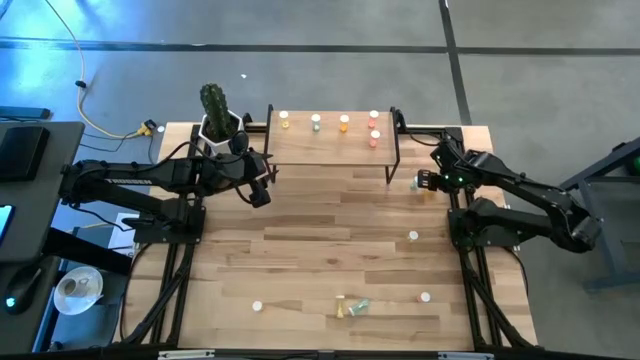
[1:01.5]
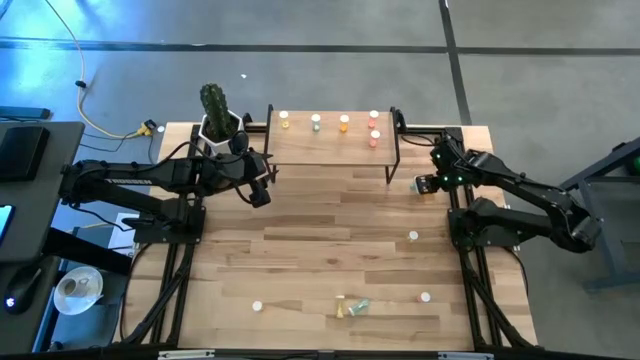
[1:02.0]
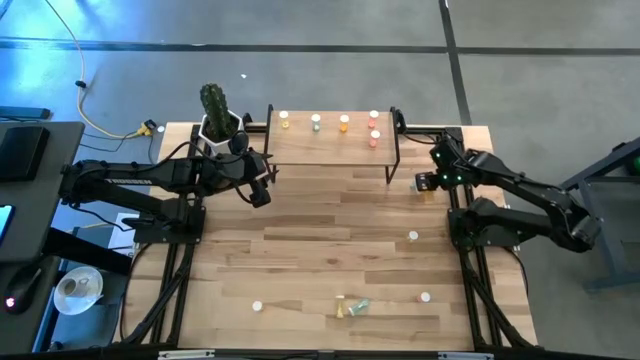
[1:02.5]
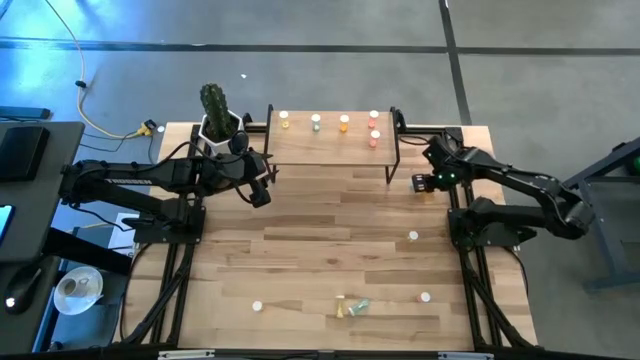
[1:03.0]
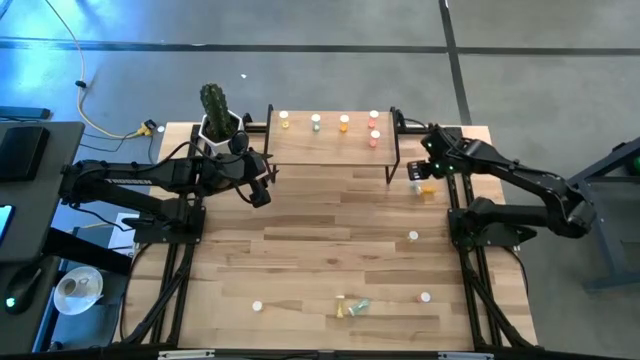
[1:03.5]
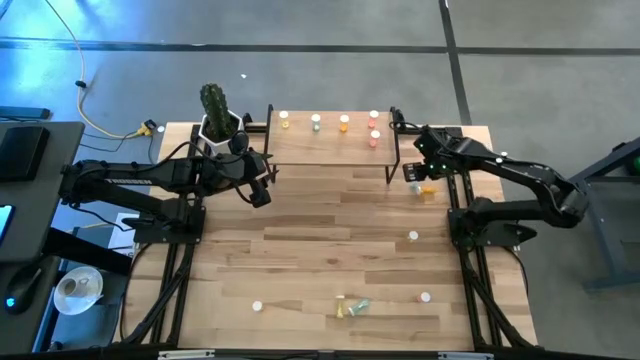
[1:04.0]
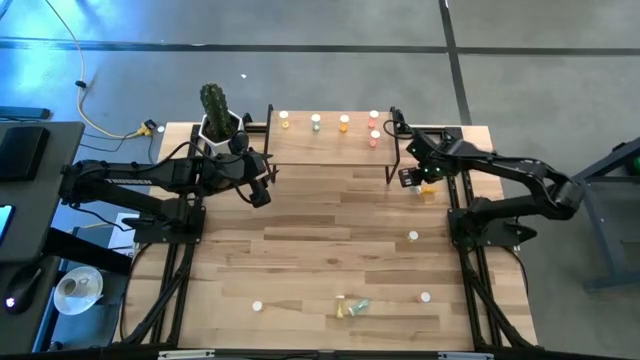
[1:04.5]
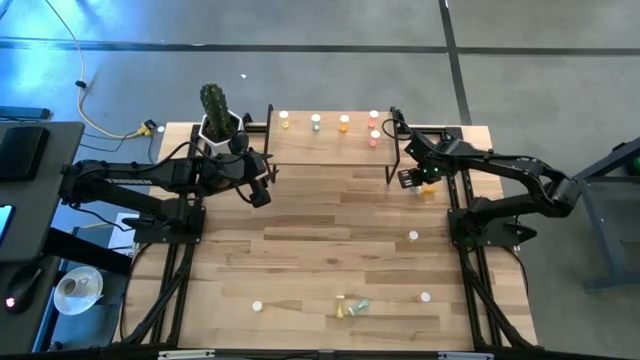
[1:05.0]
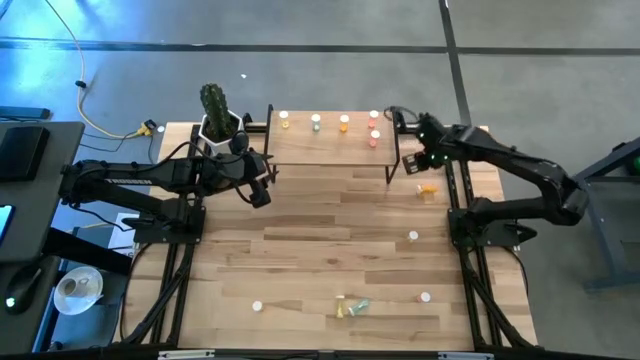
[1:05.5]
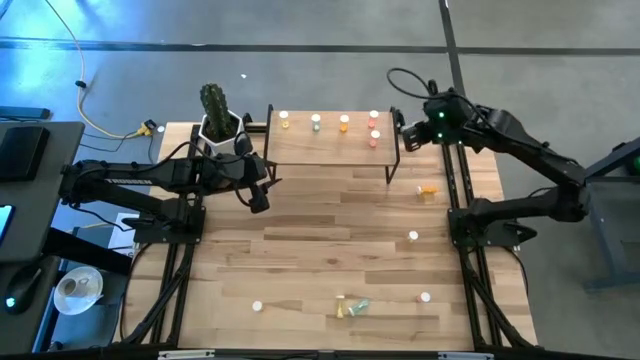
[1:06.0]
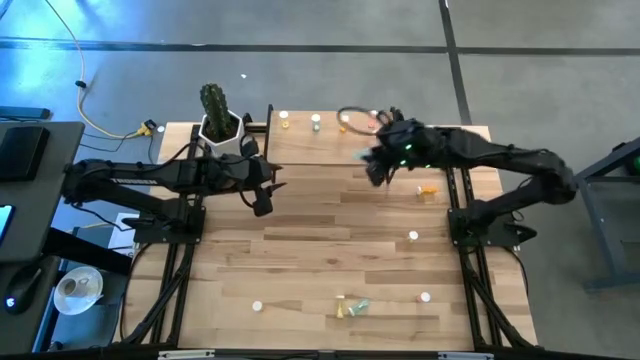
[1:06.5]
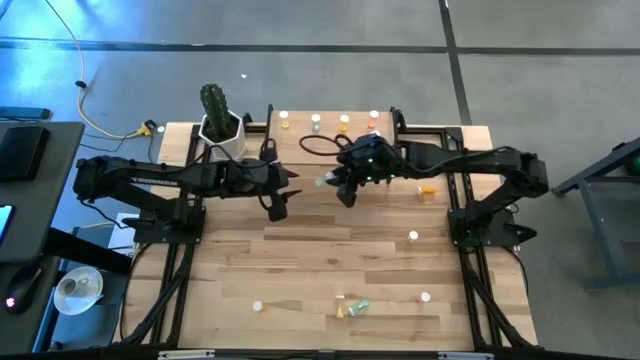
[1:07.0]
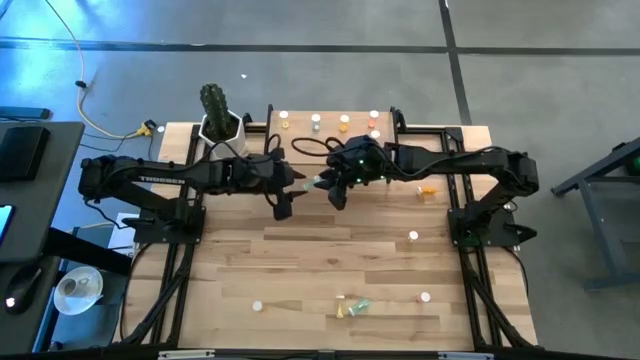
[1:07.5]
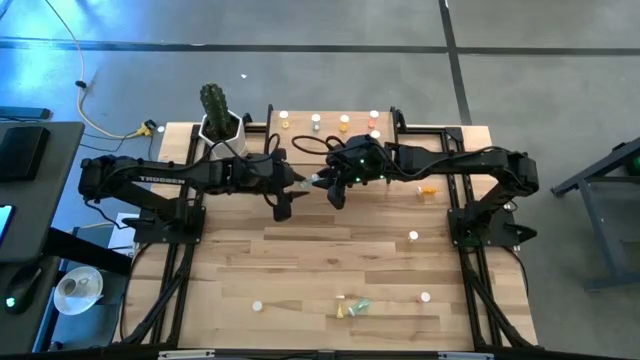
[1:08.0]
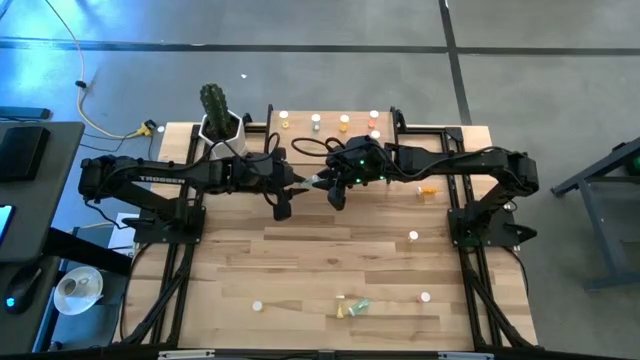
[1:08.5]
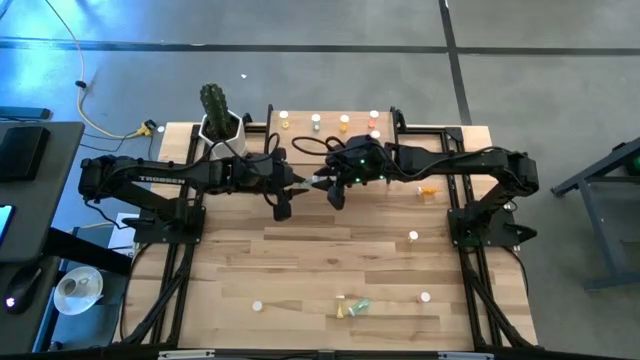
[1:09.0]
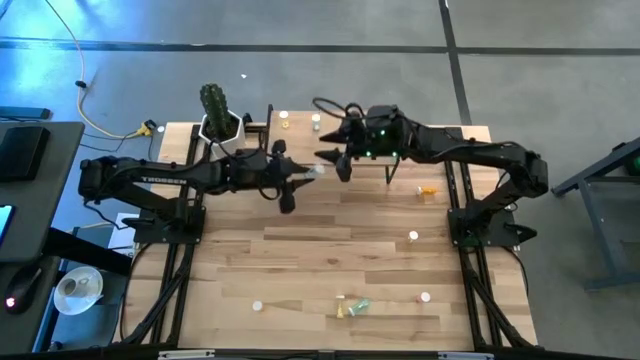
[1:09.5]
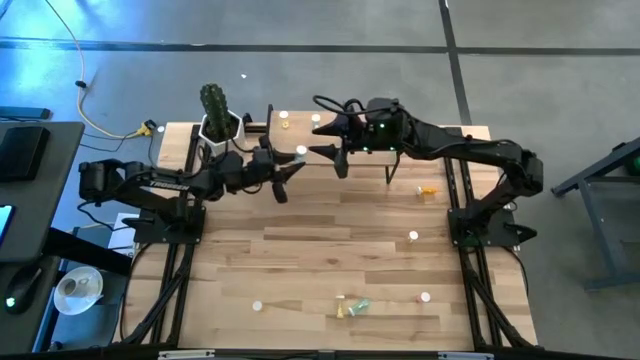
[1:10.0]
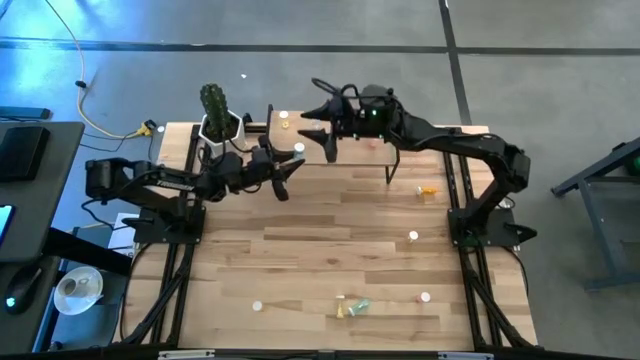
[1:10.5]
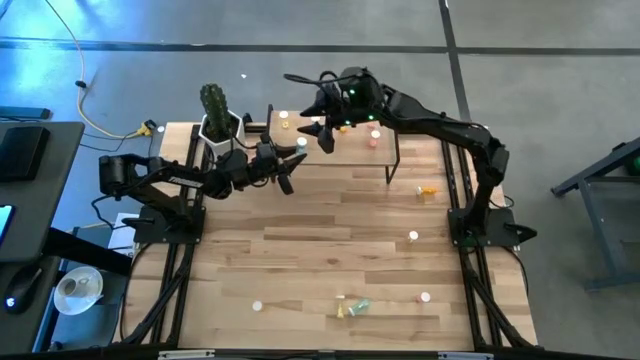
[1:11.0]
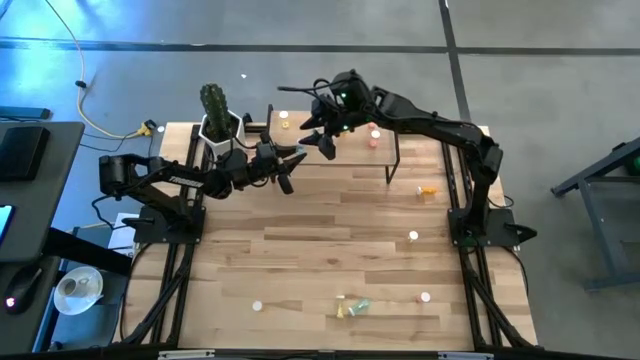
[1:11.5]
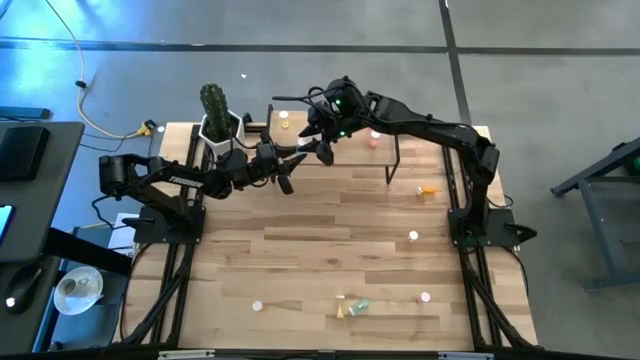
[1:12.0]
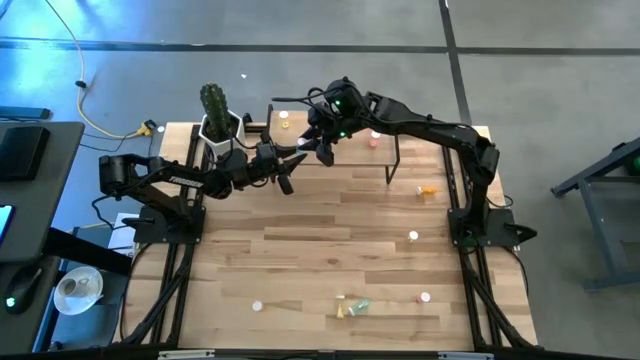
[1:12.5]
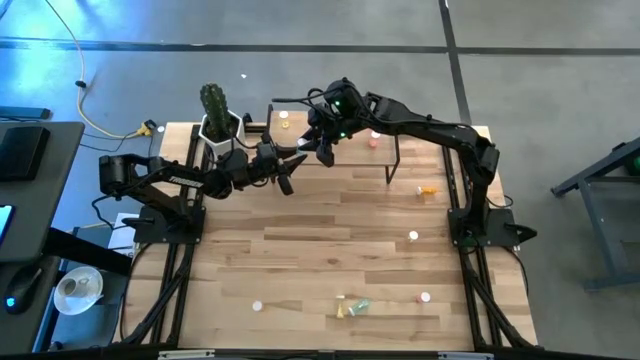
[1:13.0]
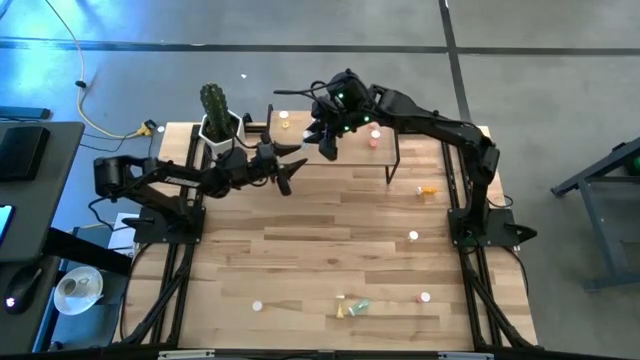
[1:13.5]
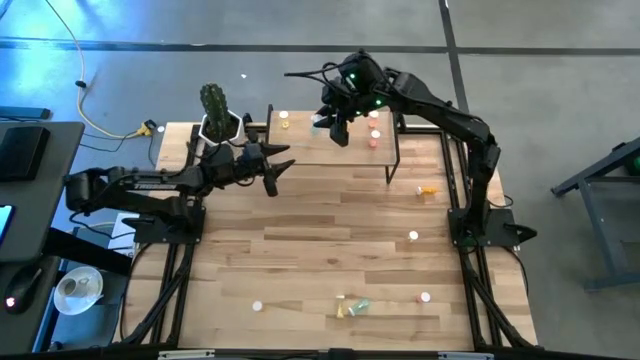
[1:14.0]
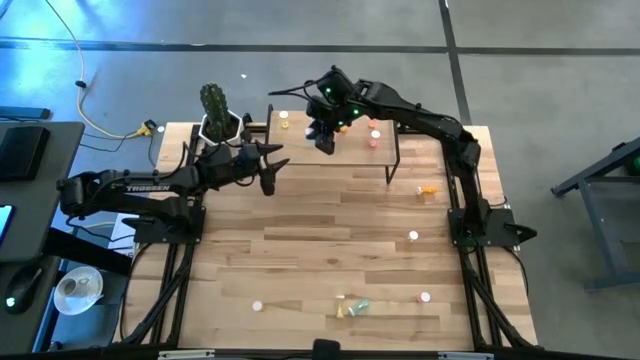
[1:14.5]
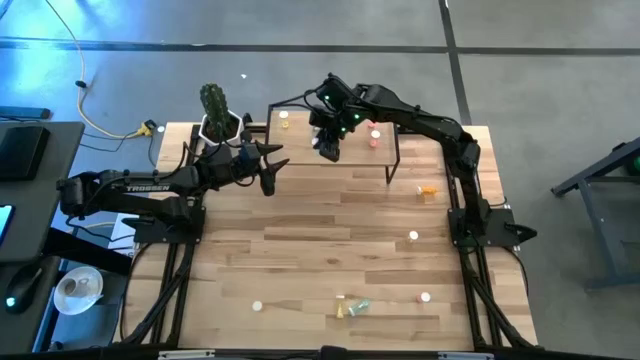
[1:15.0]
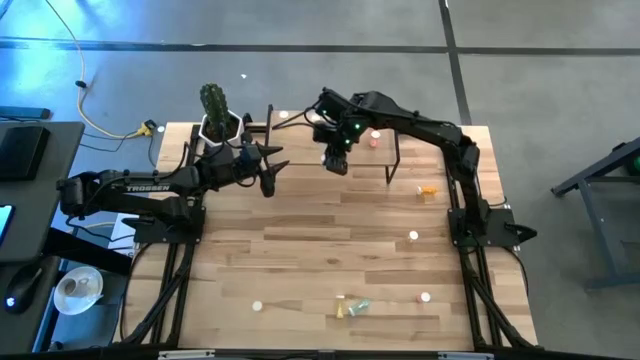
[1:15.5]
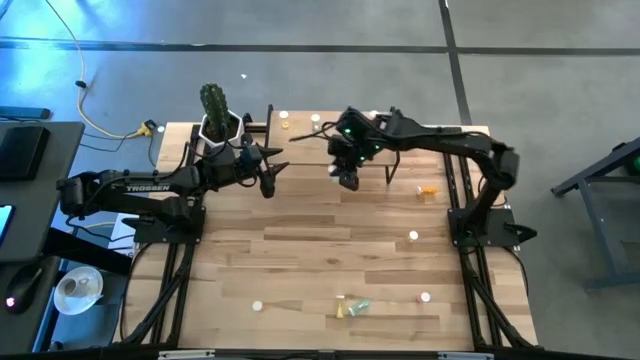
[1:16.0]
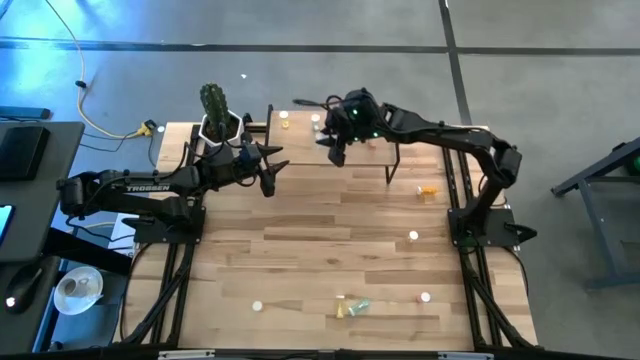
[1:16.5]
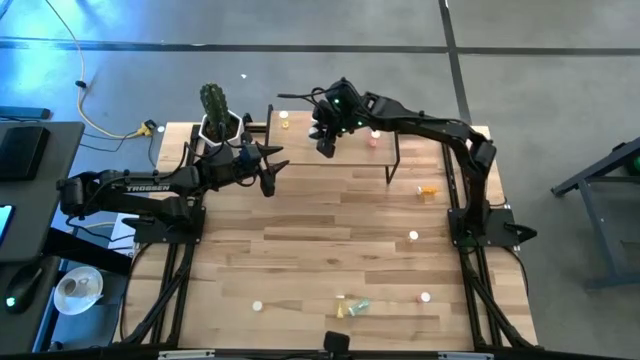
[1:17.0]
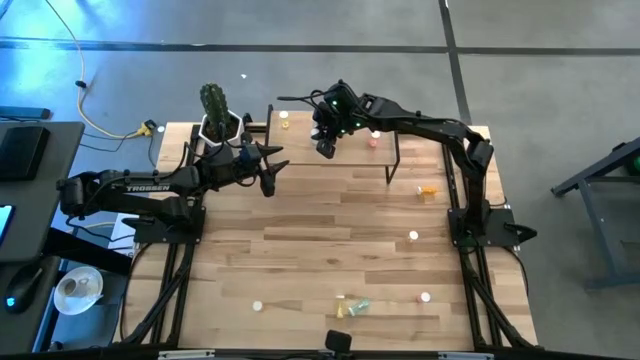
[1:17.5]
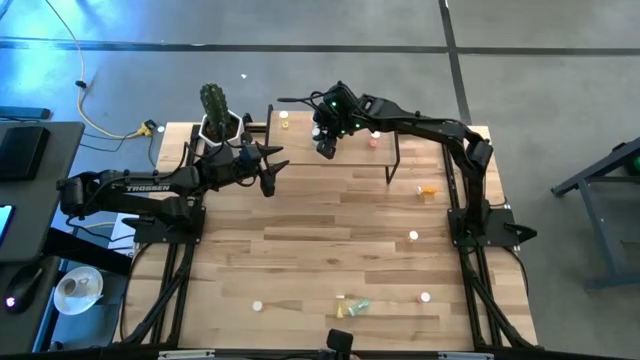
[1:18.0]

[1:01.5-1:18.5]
Task: Pick and place medicine bottles onto shelf by color
Put the top blue pill bottle on the shelf aligned with the other blue pill bottle

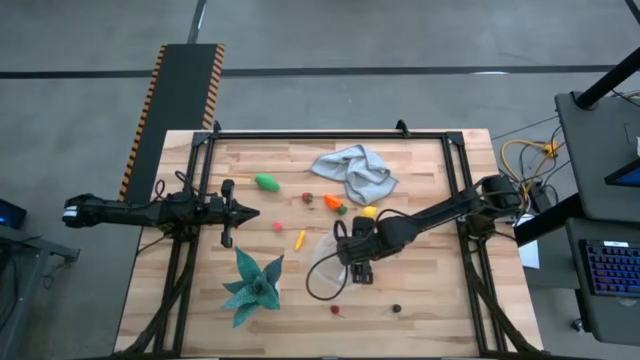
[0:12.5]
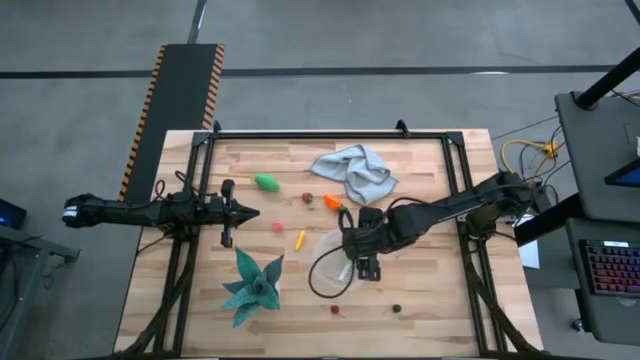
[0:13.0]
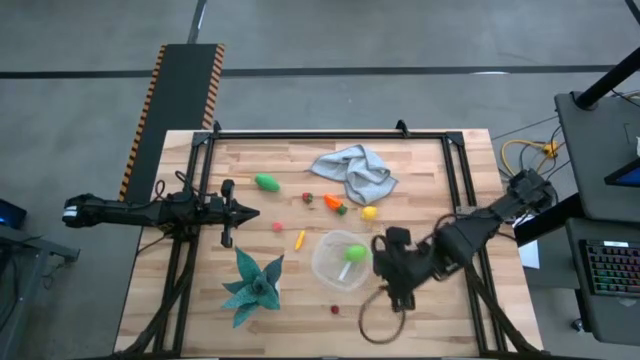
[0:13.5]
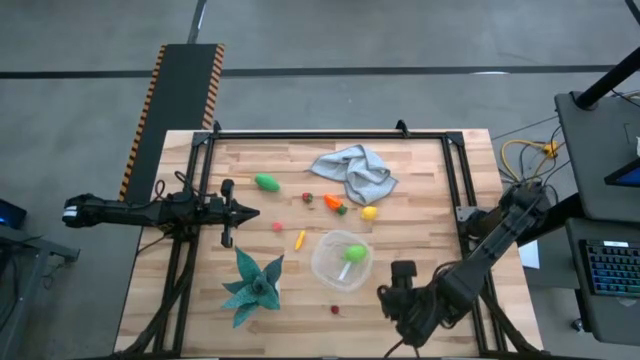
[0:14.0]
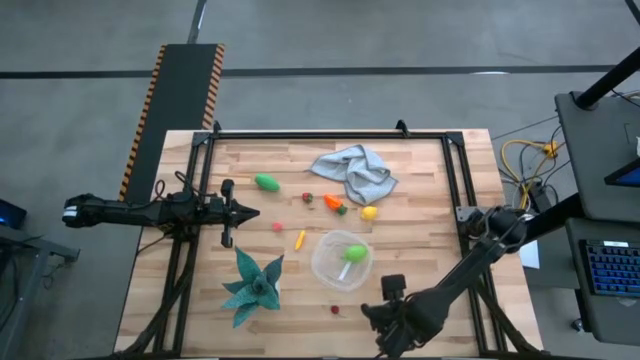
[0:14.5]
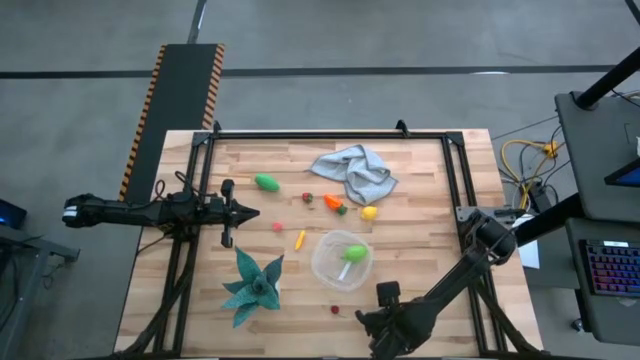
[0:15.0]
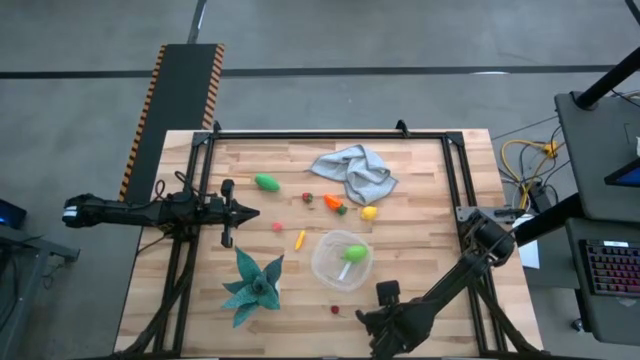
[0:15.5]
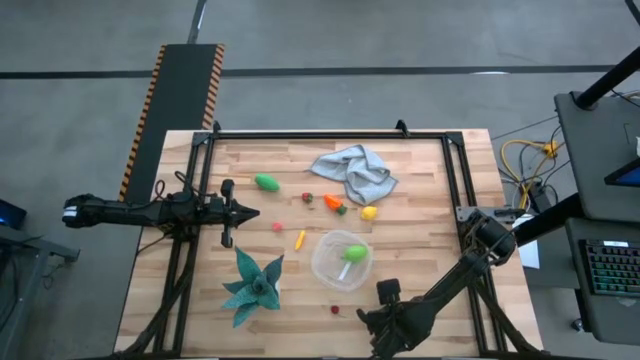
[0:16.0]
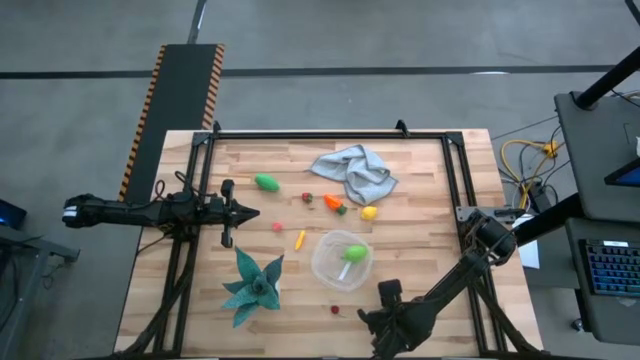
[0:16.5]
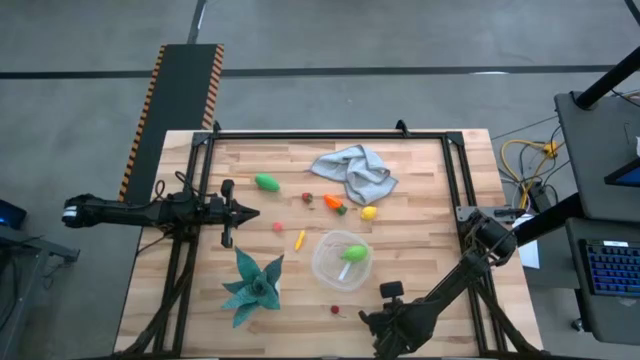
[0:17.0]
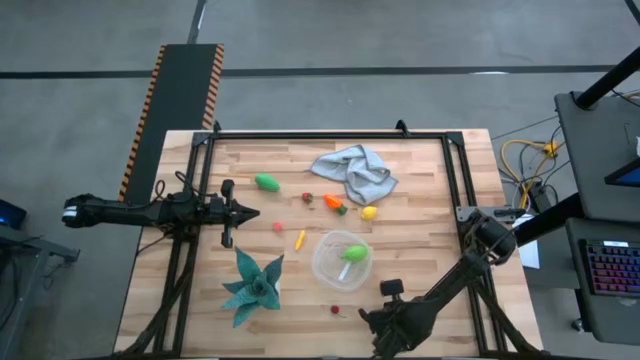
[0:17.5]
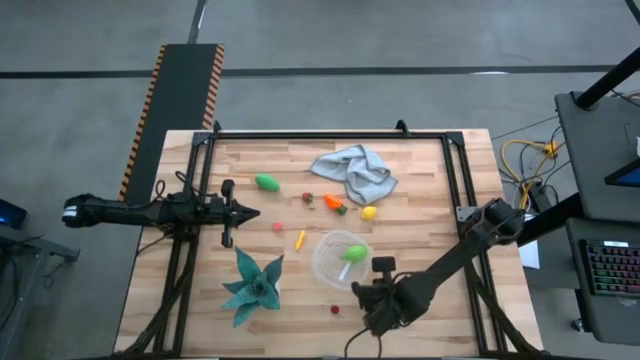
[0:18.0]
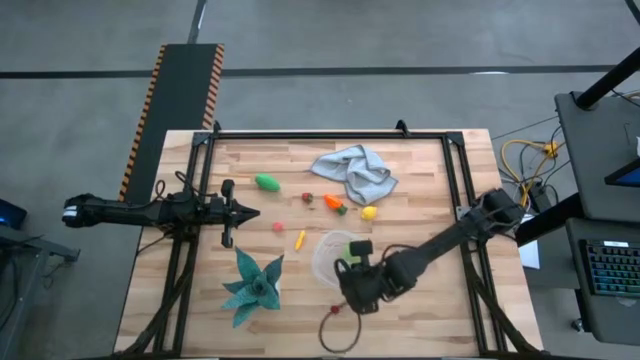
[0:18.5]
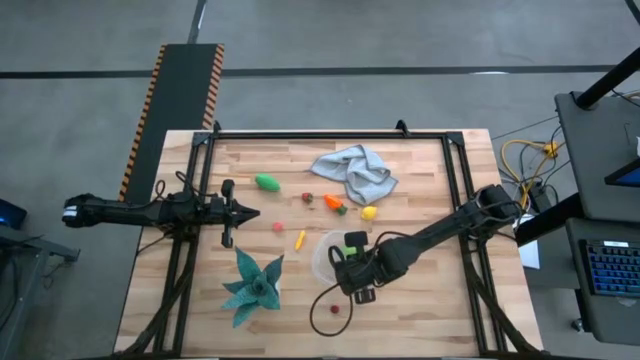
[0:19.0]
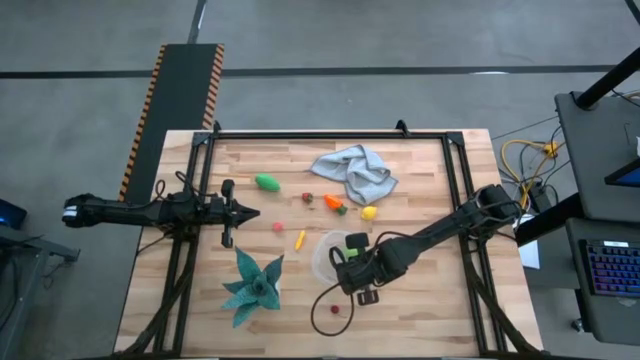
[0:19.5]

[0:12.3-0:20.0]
Task: Pick and placing Produce into tupperware
Put the black cherry into the container
